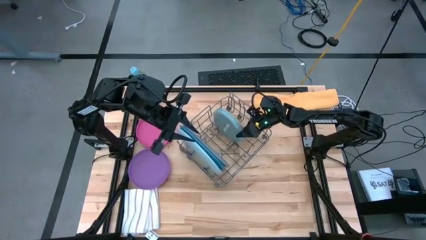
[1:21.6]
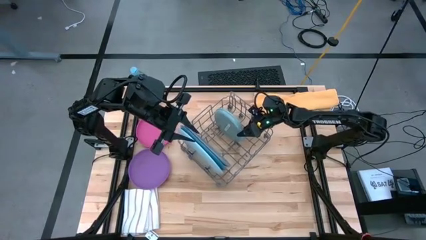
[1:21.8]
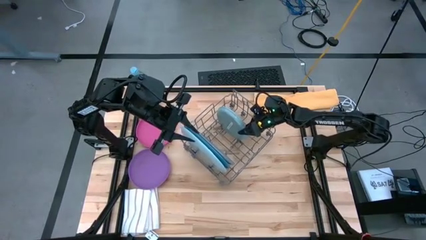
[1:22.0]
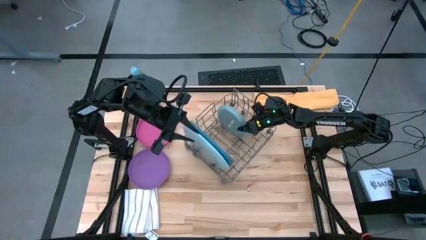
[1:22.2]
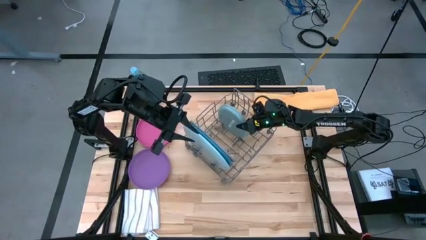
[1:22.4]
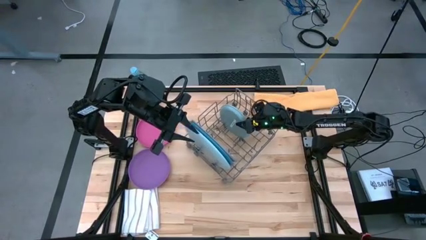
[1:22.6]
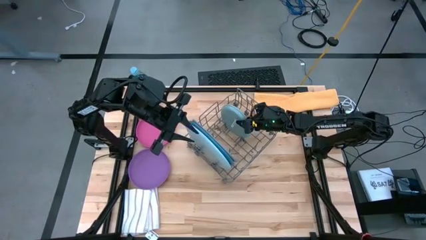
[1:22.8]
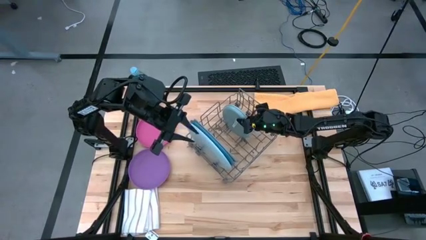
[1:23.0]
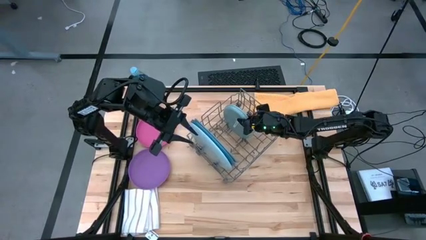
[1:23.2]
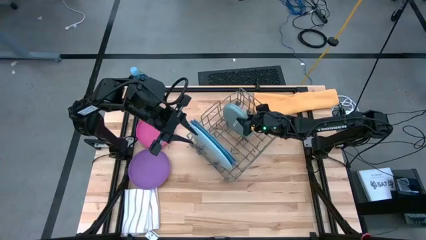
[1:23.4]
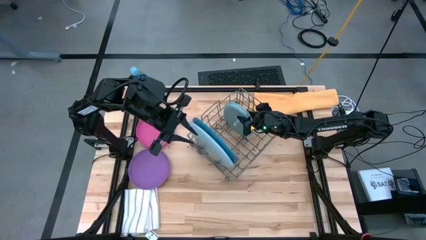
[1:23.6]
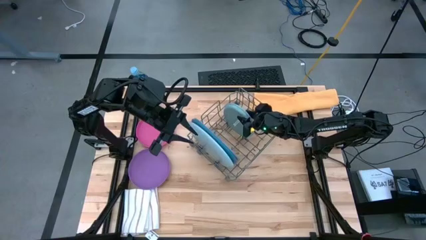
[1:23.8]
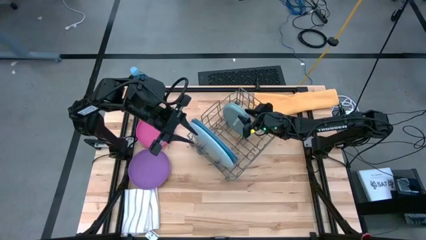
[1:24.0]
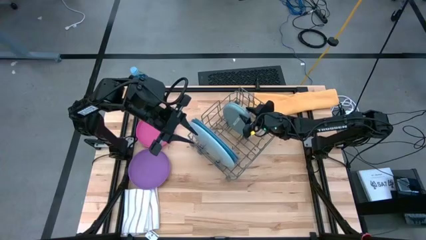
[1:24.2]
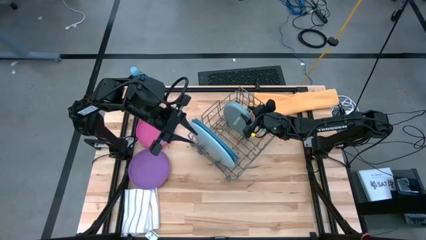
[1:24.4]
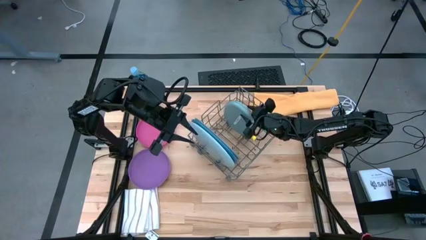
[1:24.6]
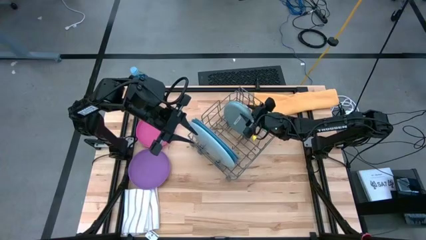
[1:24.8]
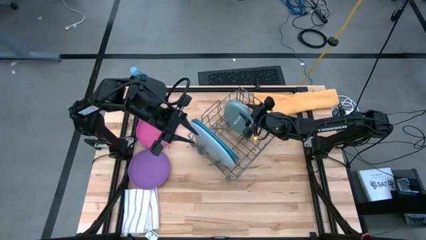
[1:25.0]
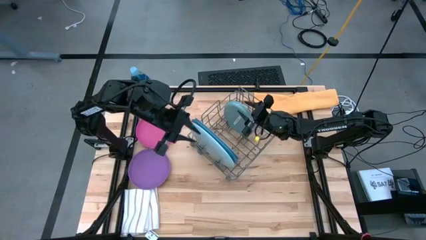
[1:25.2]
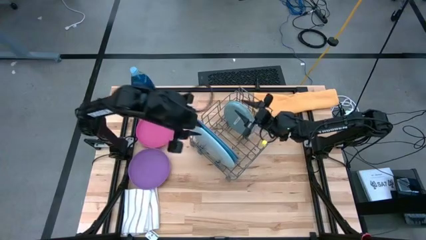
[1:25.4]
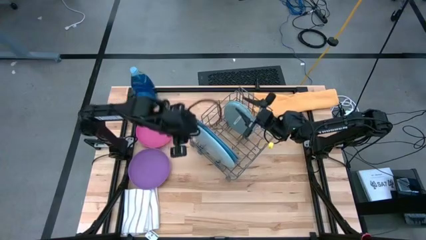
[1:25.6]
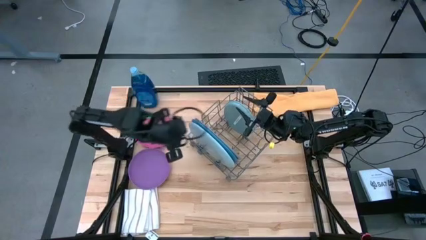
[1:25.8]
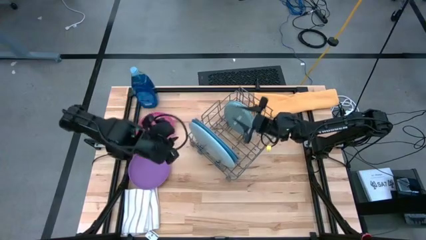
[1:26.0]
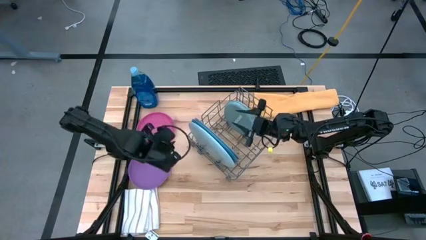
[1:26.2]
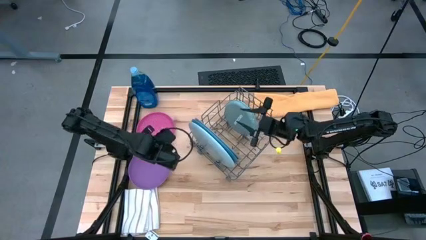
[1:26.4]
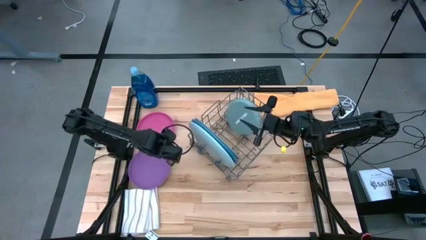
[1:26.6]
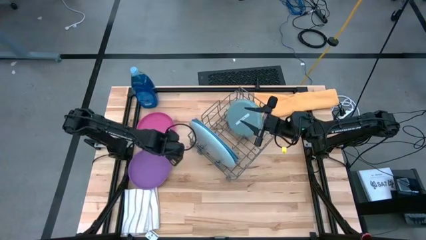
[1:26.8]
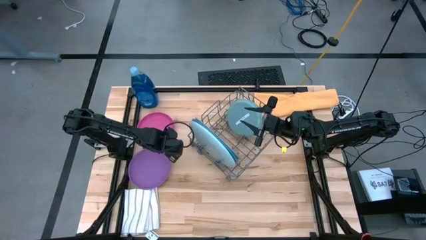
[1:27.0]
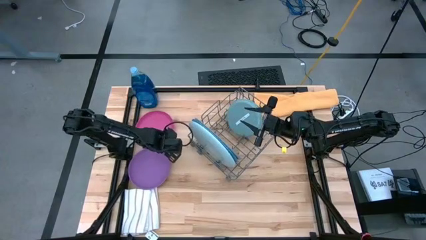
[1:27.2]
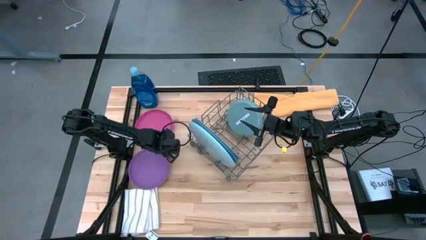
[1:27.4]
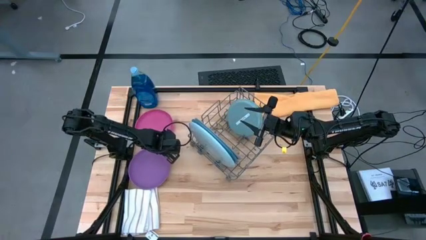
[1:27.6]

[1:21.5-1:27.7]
Task: Sort dishes
Put the pink plate into the dish rack

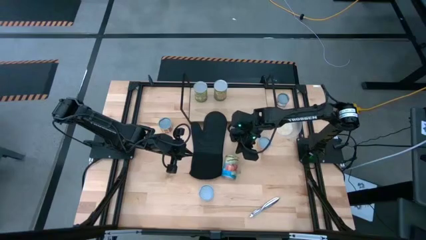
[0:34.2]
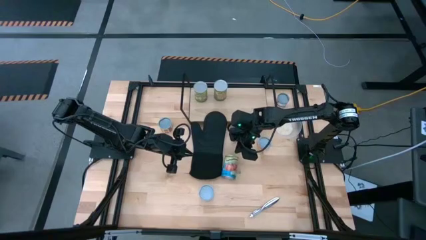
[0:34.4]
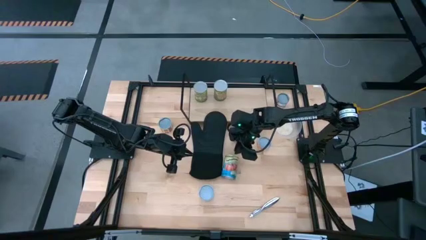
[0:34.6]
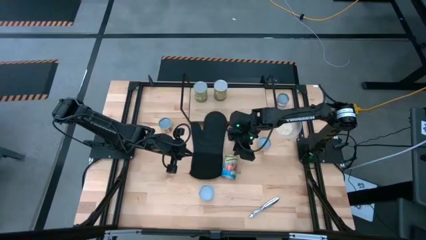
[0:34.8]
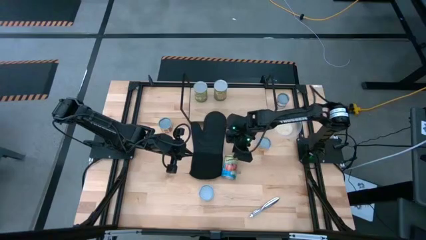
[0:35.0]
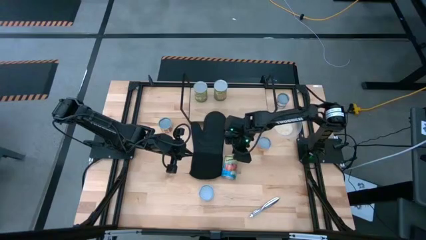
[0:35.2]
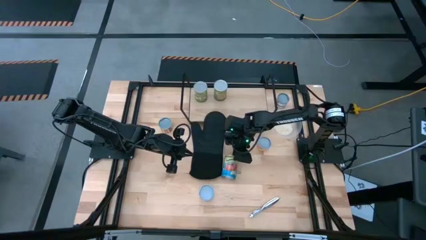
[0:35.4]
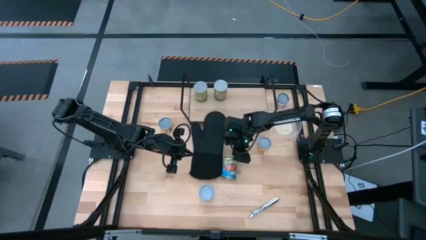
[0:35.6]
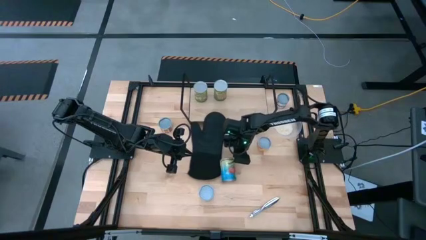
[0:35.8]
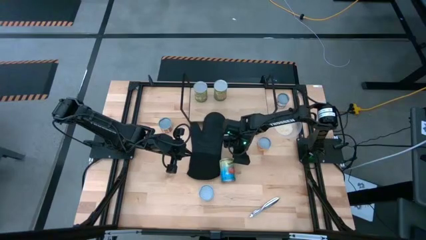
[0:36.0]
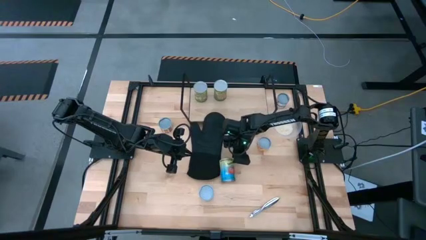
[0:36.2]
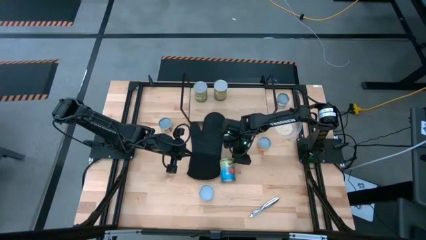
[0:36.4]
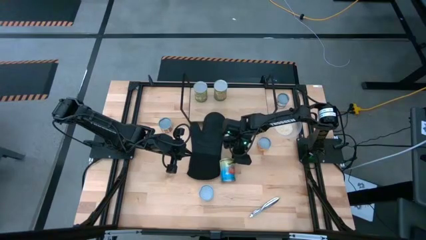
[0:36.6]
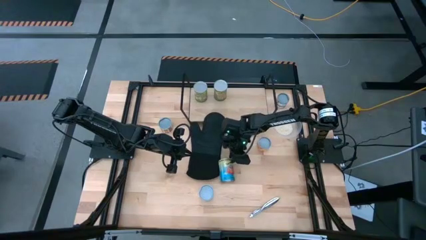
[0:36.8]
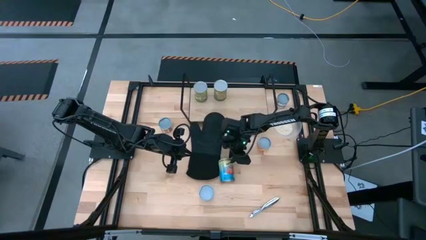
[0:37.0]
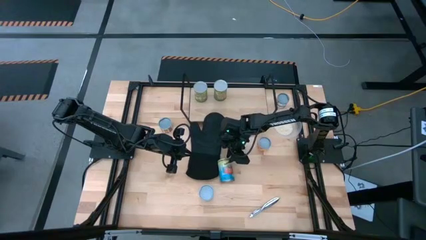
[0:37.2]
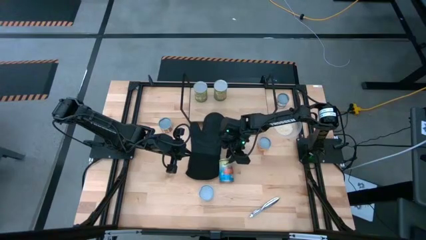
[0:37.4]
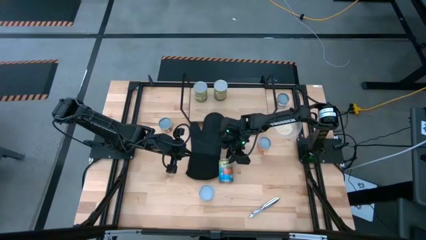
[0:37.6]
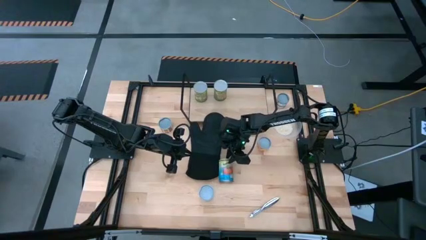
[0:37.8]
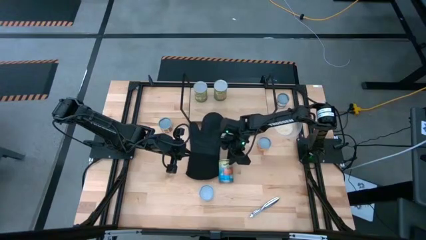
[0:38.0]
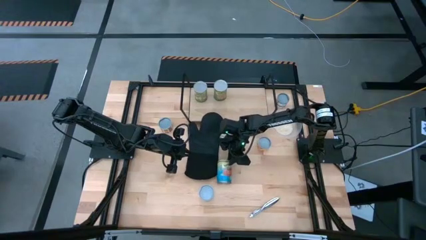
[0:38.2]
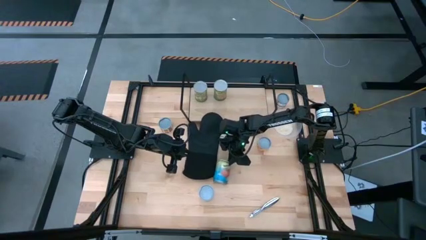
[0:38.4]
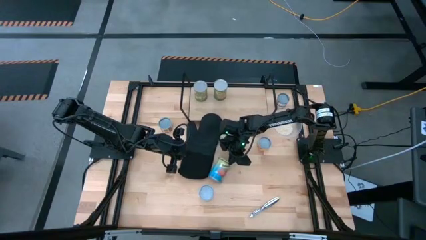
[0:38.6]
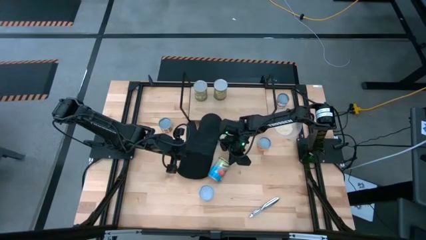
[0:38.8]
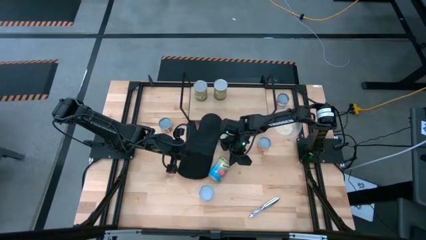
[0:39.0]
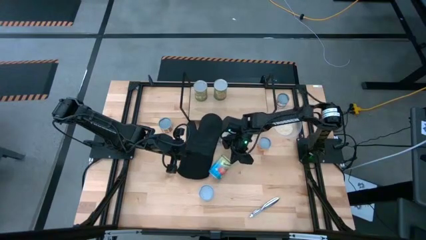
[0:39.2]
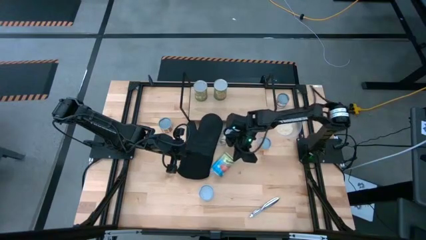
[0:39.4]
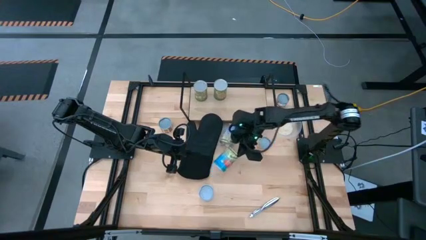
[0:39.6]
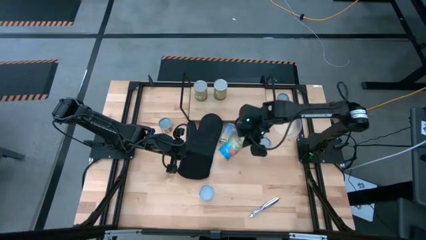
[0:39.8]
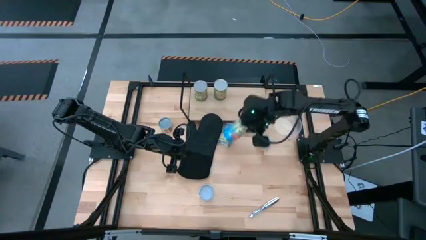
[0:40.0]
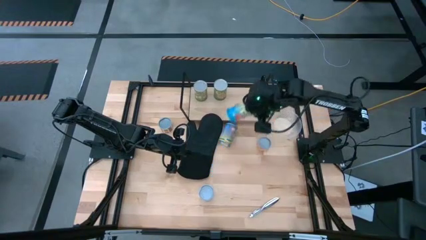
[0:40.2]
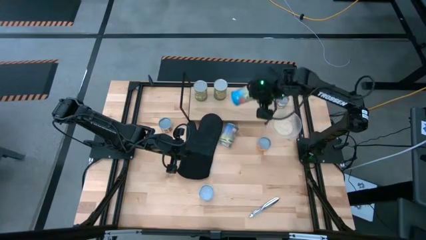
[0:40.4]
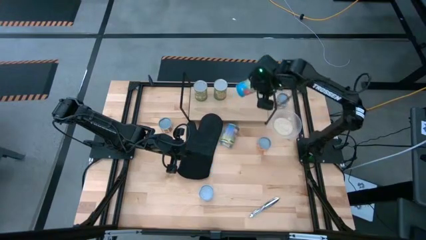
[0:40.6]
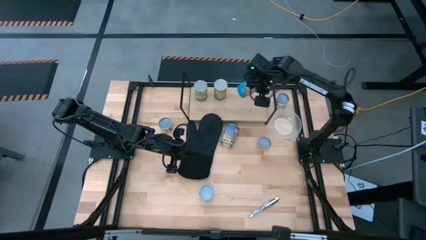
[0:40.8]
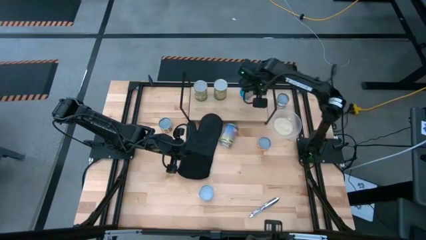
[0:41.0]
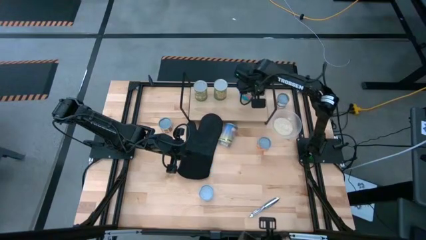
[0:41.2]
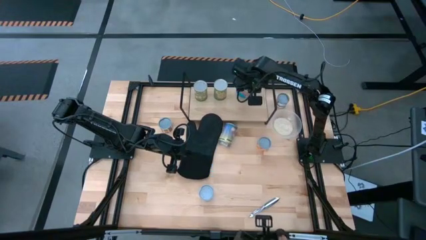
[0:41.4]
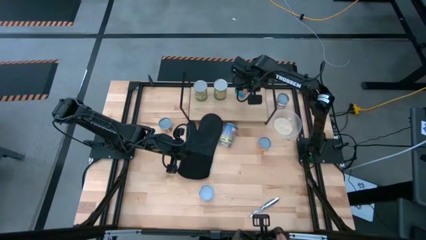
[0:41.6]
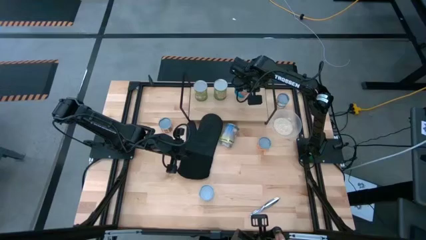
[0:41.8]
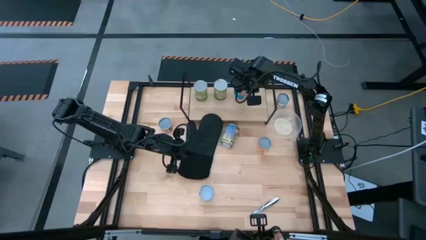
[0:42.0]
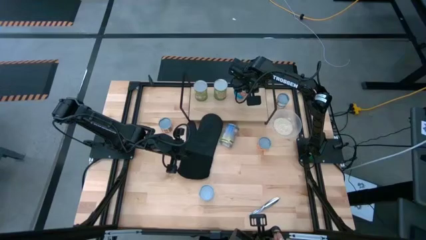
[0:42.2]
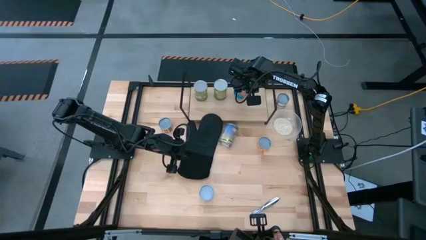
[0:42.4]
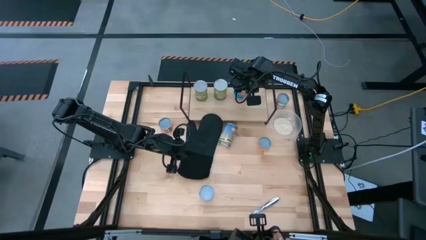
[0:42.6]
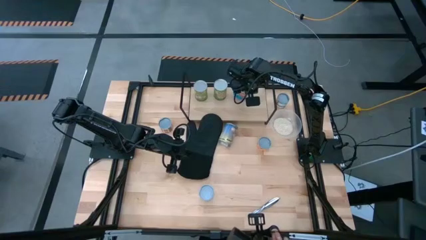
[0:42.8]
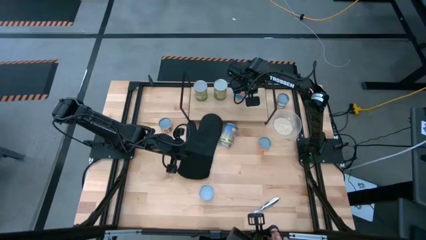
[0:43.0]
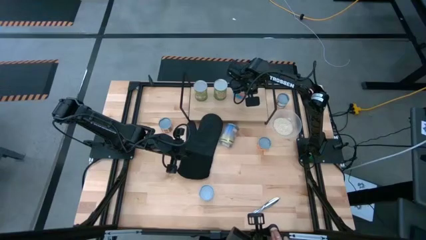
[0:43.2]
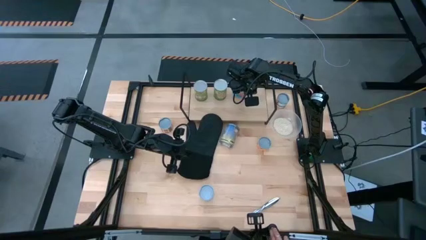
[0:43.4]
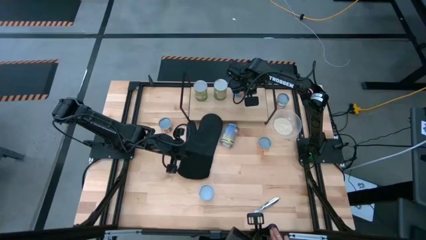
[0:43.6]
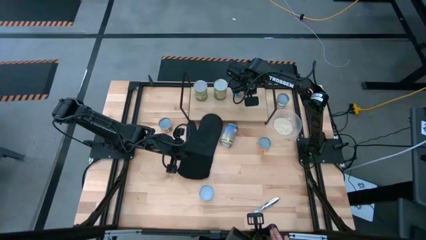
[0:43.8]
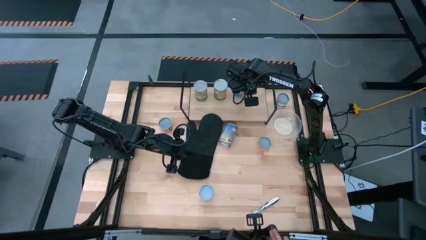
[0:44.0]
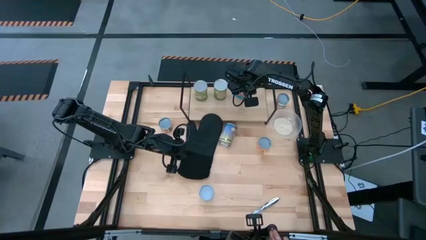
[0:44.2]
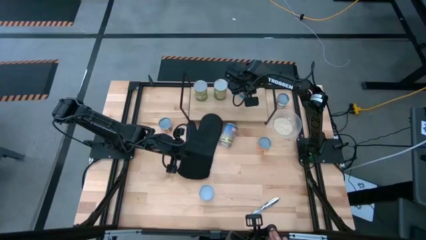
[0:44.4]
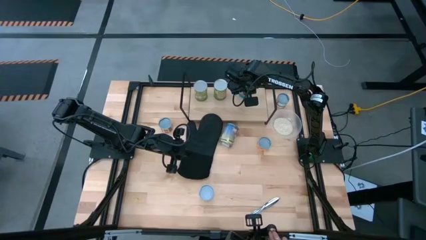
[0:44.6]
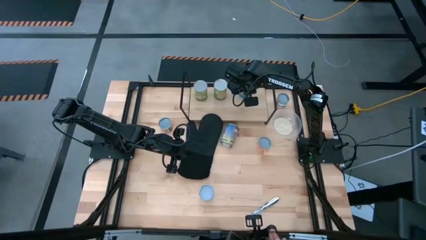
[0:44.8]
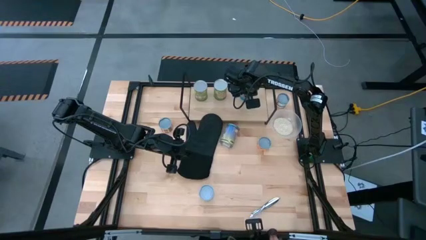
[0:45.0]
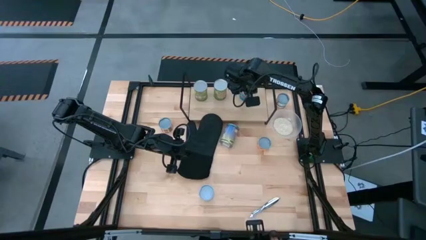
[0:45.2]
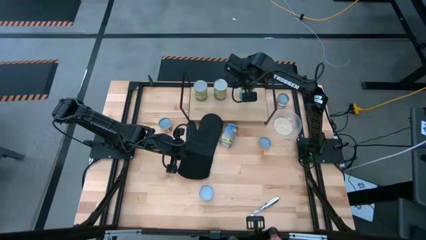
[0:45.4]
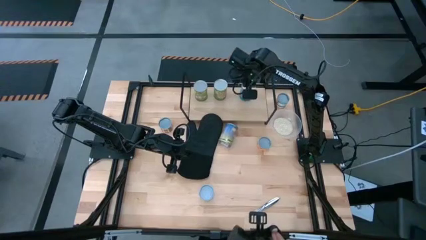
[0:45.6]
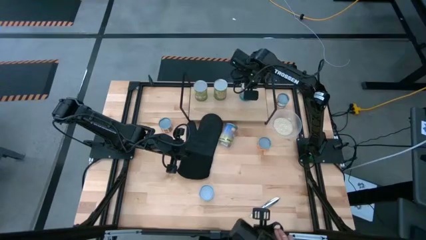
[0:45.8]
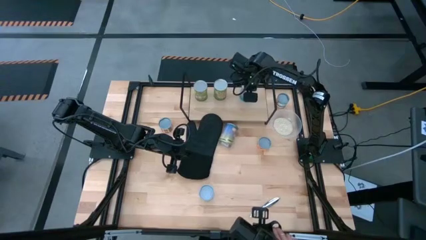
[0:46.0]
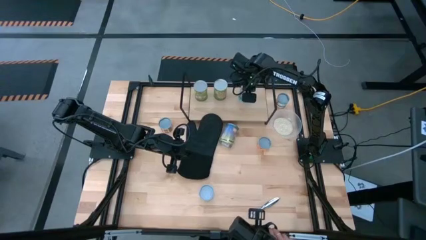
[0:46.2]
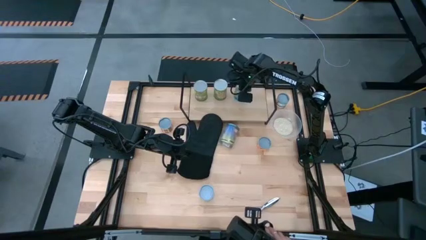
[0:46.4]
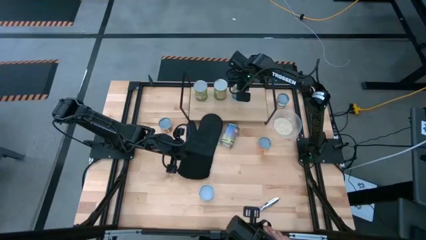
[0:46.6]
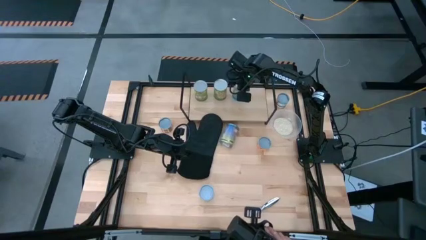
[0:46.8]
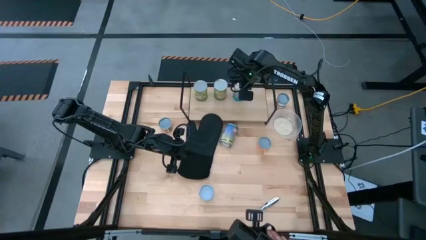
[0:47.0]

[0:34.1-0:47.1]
Task: Pick and place cans onto a shelf
Put the large canned tomatoes on the shelf
